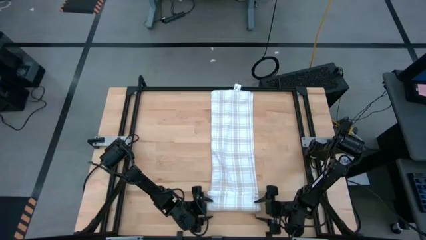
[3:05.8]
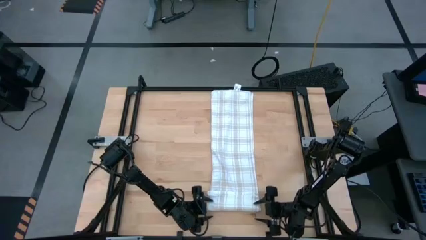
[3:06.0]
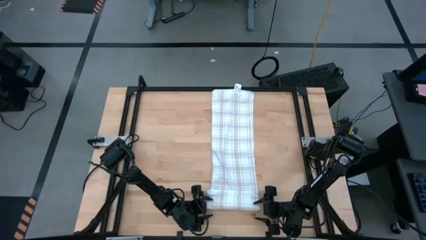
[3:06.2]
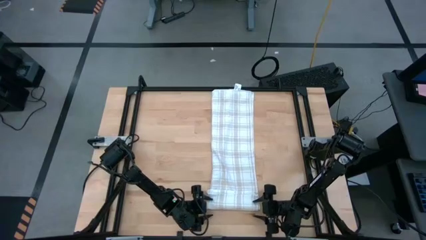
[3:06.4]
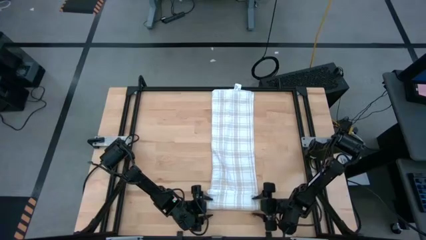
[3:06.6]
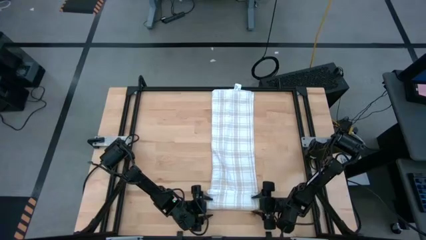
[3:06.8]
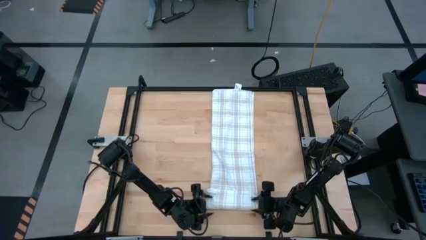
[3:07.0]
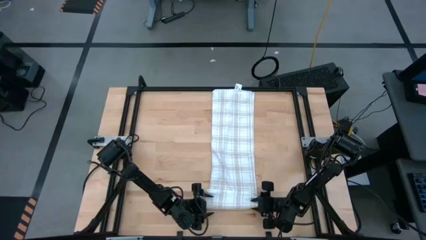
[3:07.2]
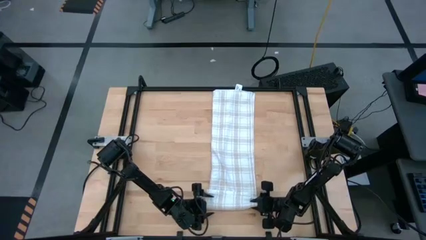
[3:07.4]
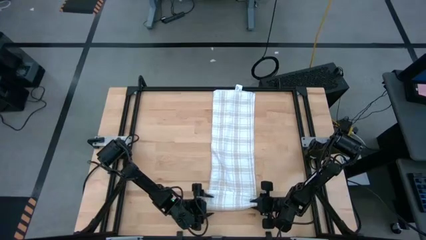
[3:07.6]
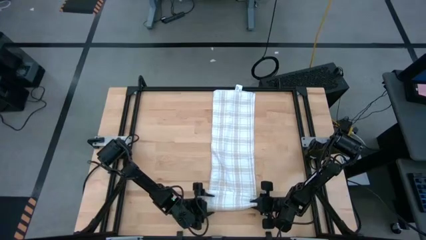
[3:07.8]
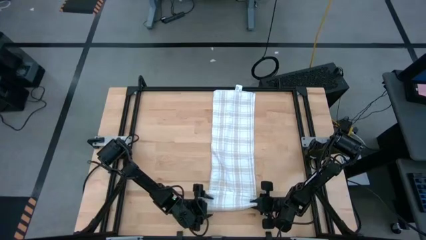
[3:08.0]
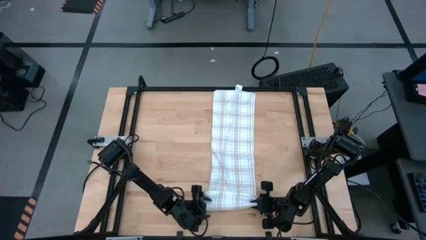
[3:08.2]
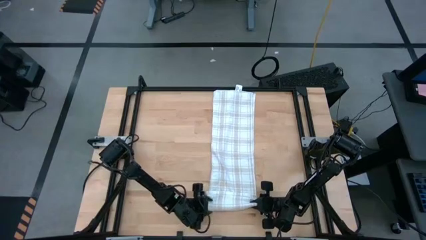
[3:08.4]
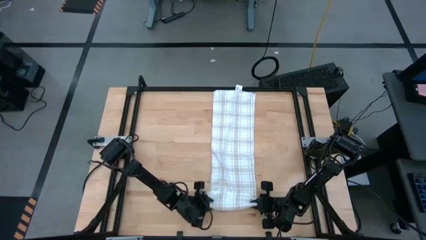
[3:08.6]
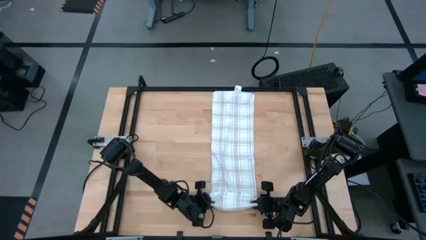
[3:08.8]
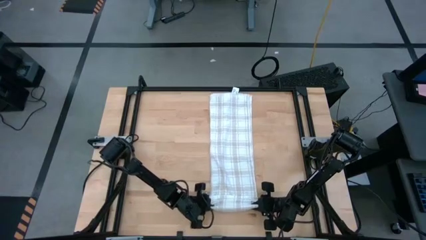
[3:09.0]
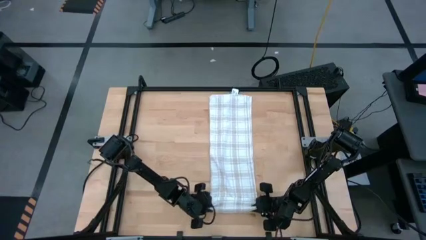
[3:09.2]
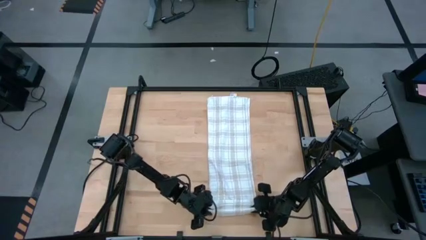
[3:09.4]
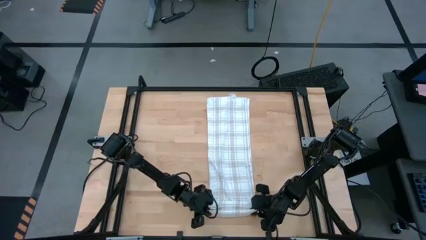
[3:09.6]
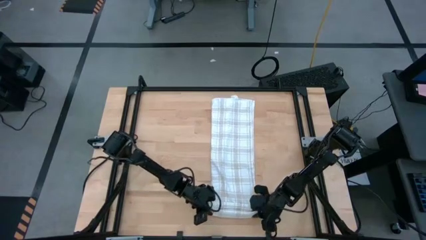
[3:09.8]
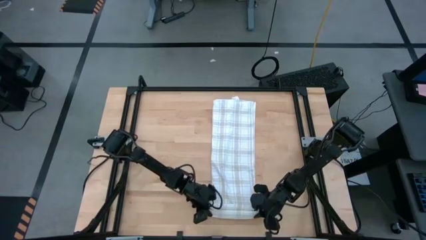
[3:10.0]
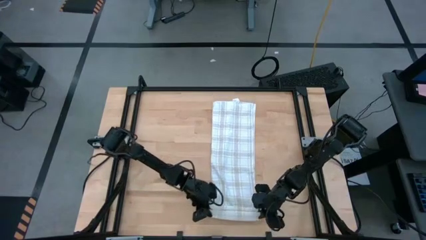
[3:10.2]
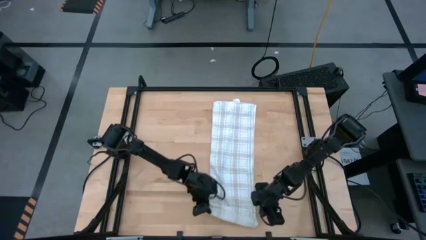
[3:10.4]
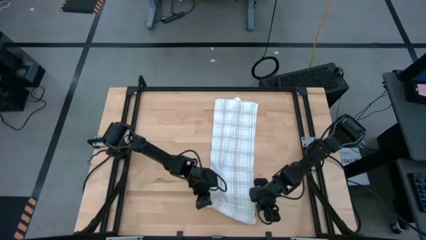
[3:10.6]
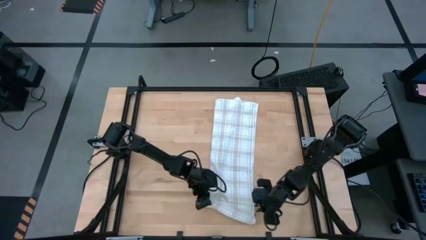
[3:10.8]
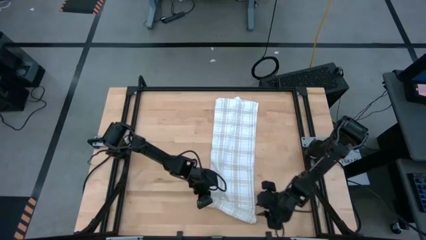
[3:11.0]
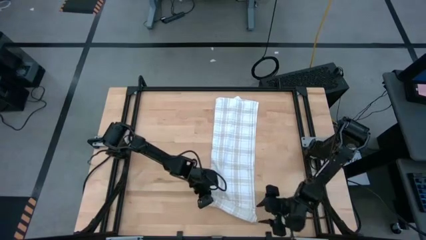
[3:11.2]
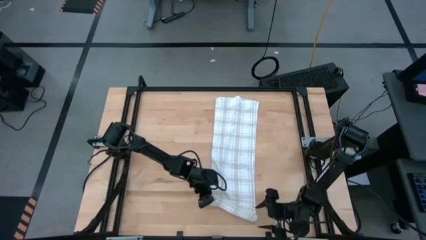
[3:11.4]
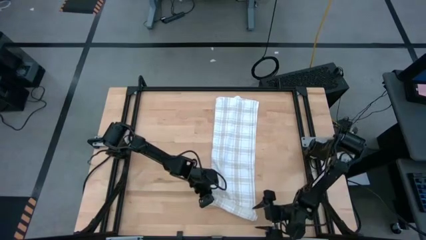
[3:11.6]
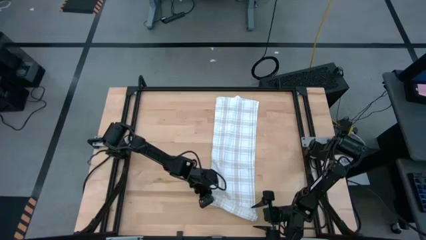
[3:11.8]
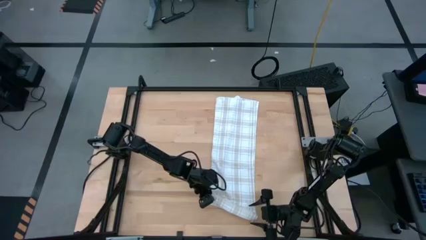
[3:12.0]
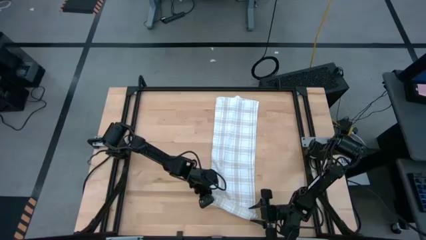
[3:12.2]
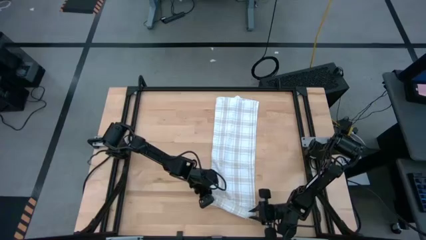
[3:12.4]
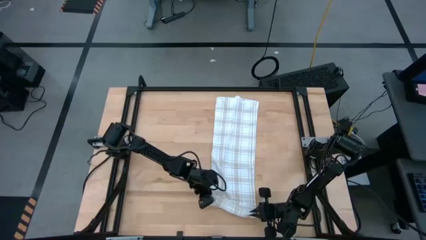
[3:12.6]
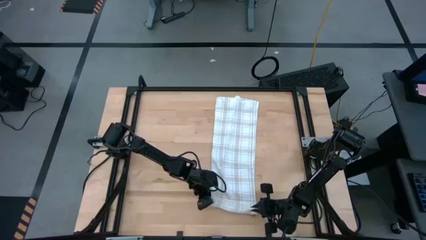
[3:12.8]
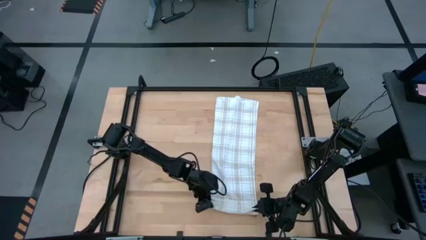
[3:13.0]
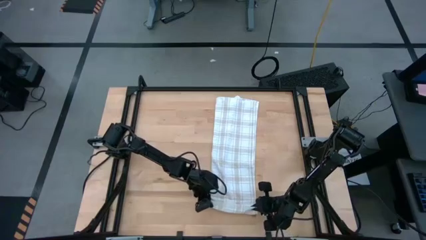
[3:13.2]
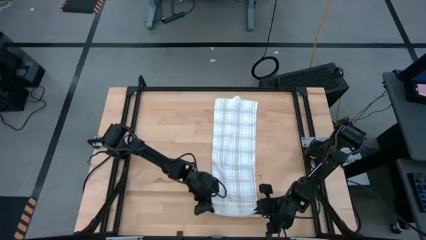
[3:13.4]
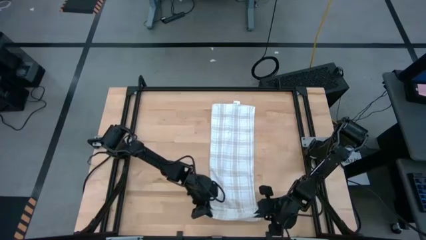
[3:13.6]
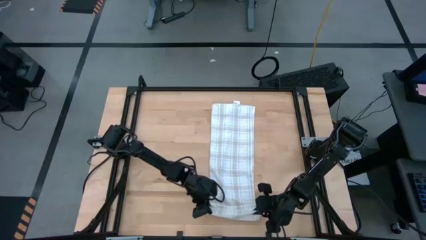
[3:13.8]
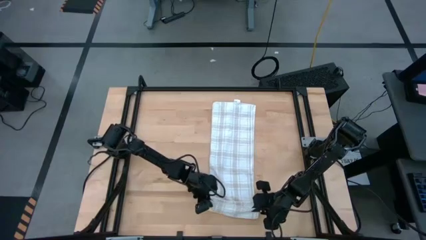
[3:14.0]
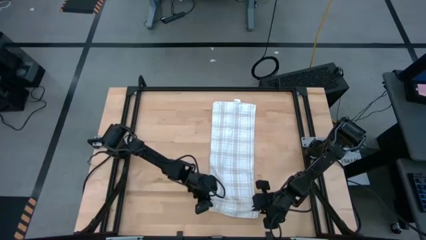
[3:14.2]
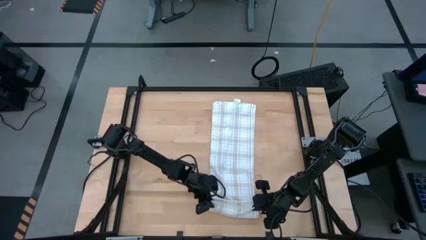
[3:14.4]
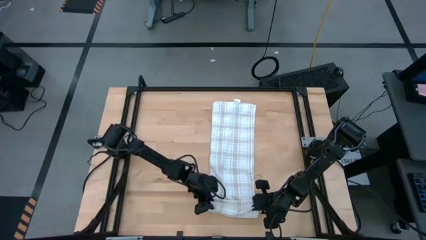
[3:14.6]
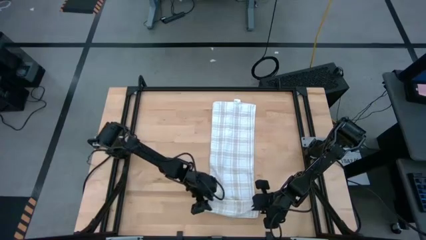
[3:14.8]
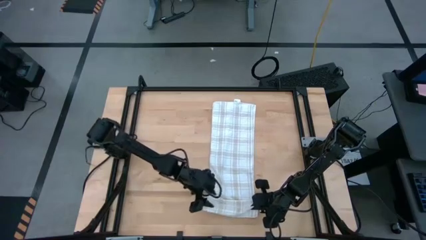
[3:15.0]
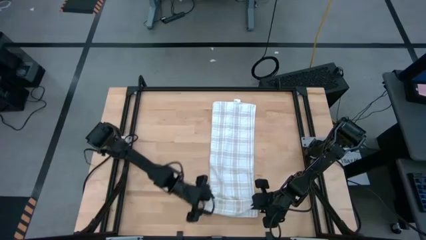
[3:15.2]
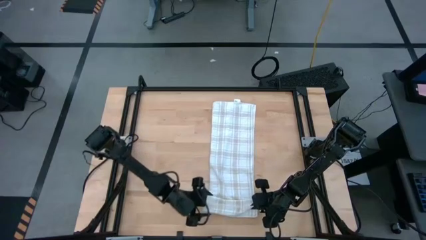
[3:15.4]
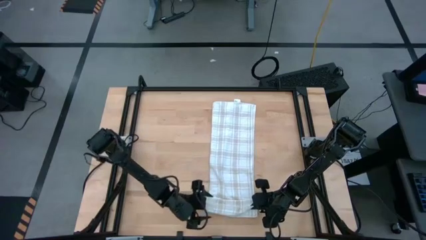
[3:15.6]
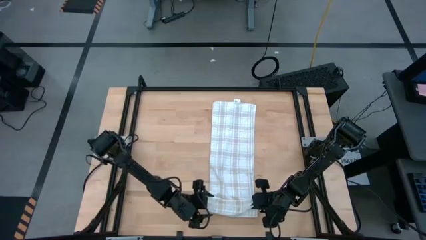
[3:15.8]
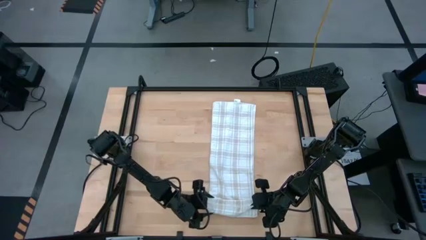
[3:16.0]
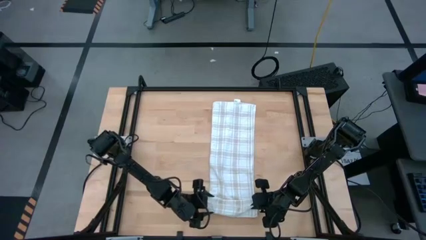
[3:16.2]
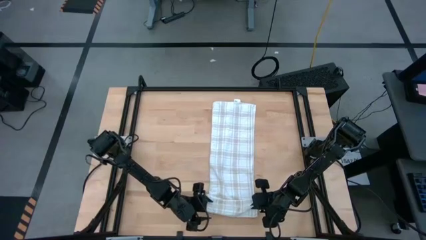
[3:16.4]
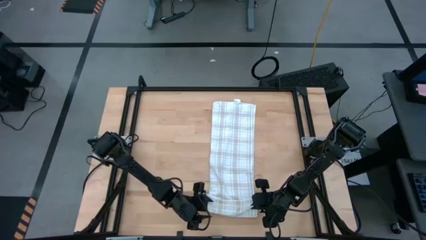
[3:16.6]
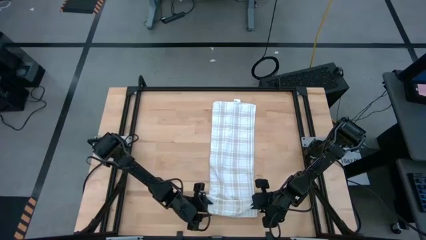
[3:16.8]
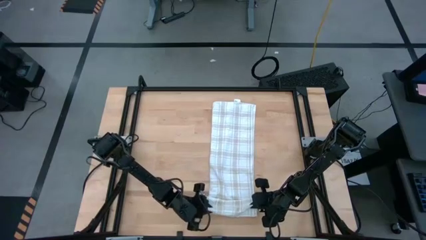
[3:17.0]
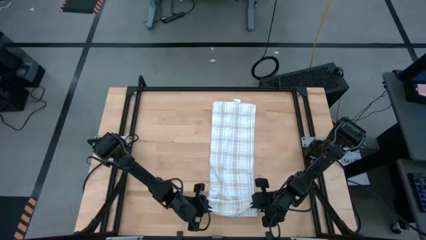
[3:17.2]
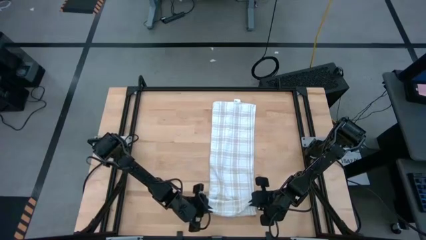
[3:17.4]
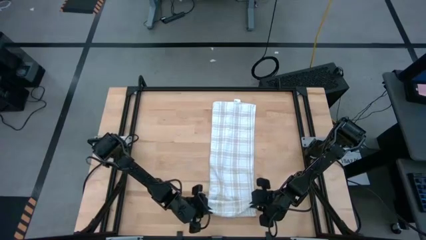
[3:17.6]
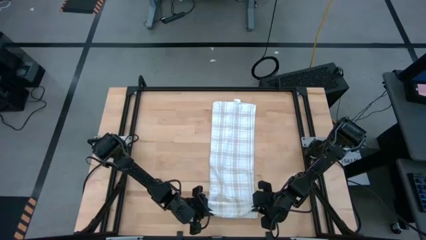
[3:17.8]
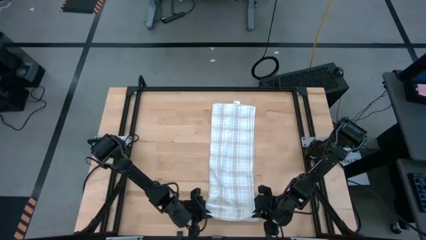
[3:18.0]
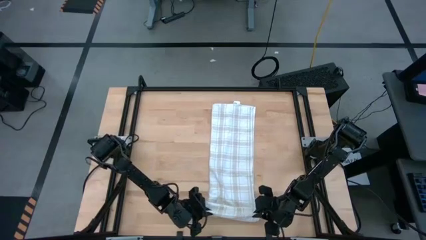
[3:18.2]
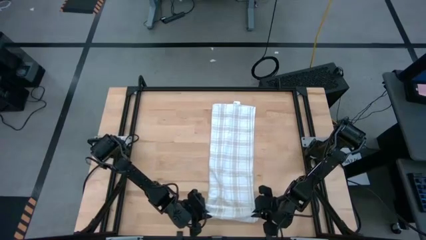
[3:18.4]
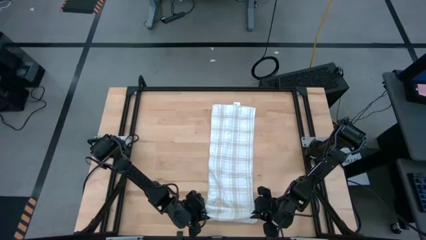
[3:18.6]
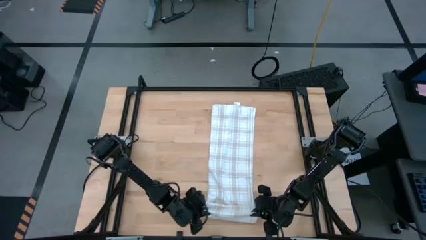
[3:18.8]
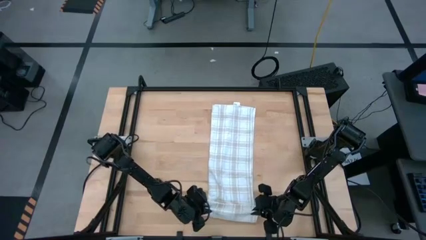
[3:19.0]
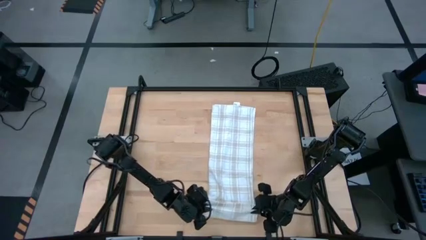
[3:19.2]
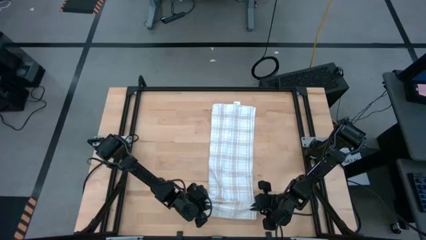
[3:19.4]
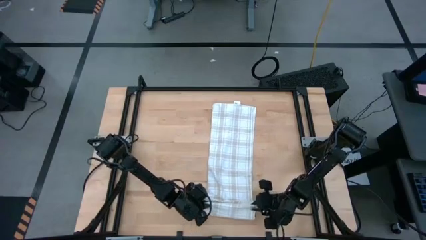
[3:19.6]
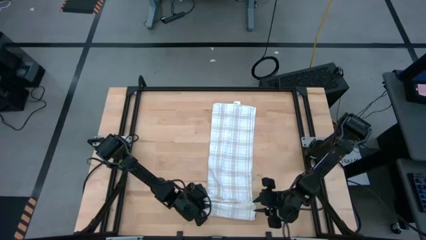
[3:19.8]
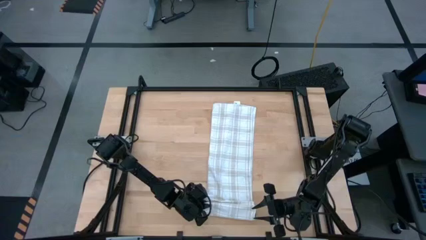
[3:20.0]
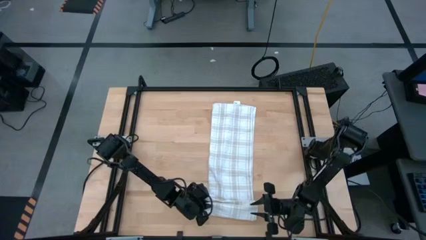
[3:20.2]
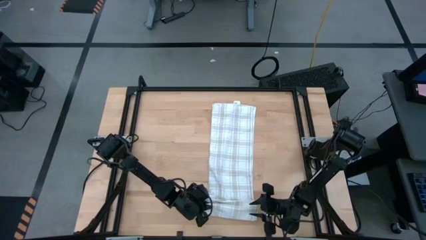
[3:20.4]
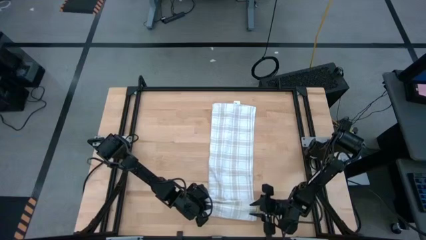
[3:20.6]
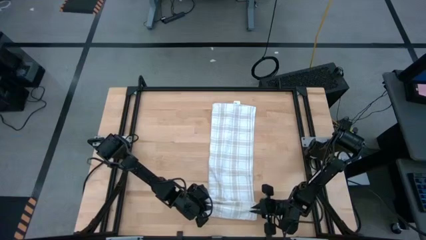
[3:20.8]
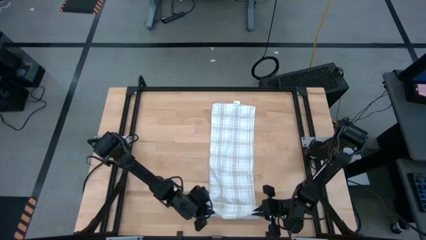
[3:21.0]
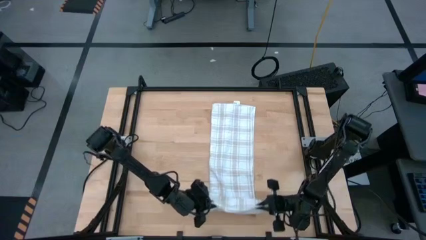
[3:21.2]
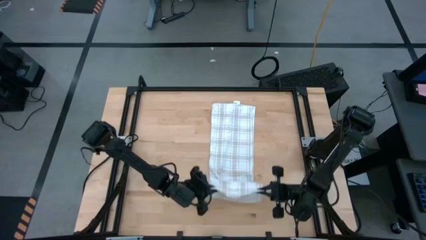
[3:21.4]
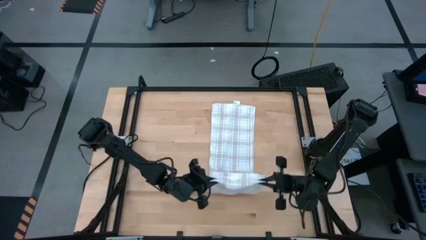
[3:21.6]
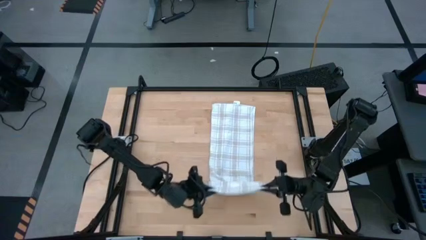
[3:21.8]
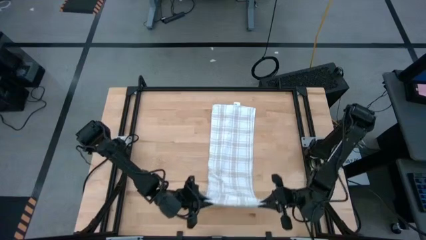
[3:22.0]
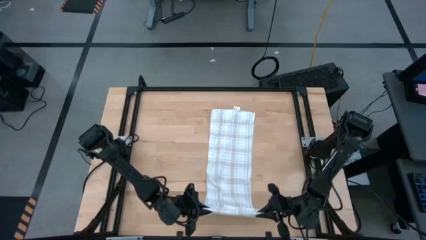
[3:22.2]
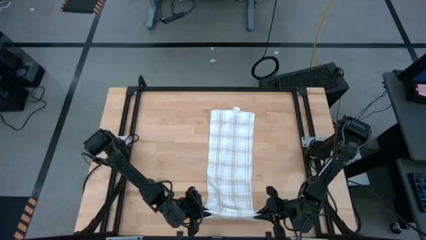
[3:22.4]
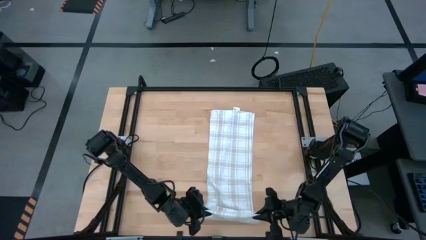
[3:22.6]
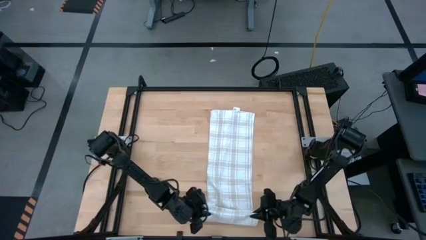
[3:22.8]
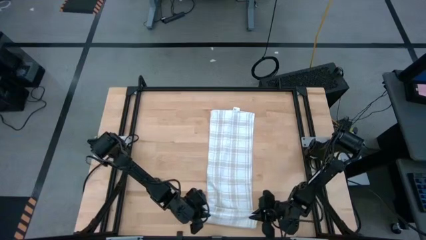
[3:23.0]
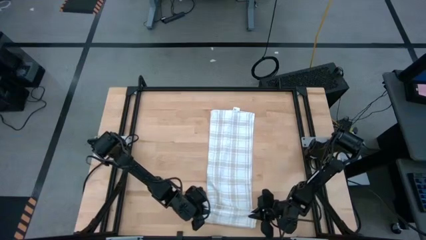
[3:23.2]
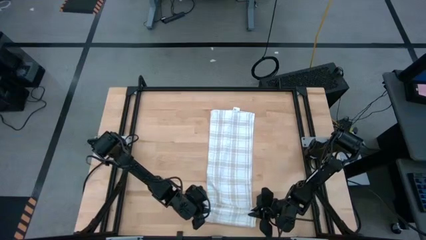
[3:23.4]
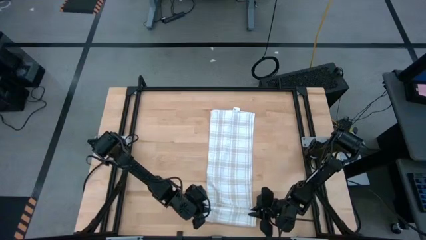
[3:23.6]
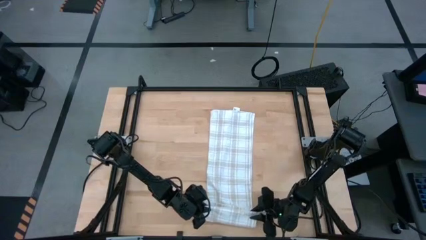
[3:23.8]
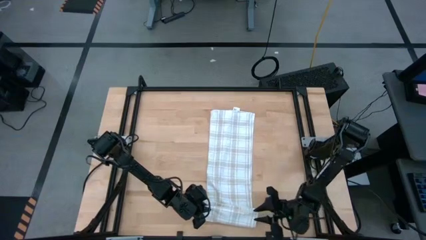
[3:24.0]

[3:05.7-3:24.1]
Task: Roll towel into tight, uniform cylinder
Roll the white towel
